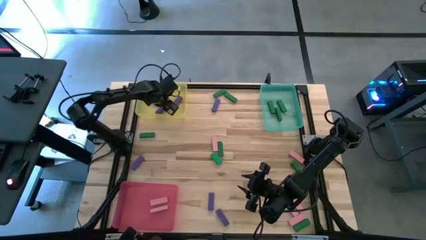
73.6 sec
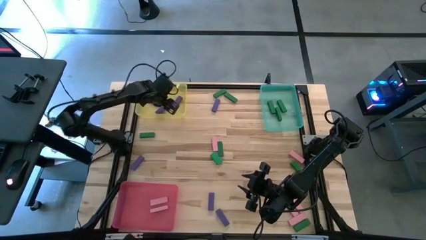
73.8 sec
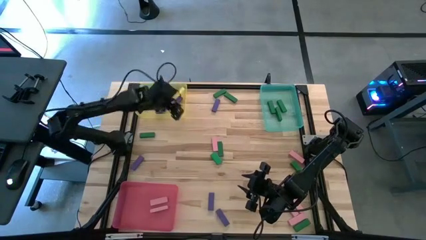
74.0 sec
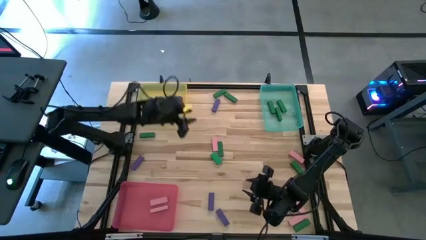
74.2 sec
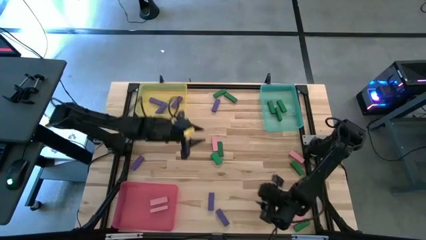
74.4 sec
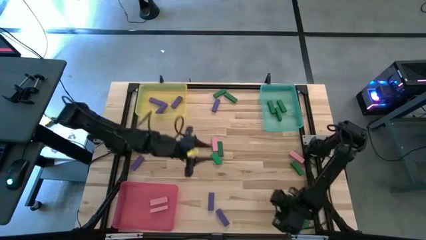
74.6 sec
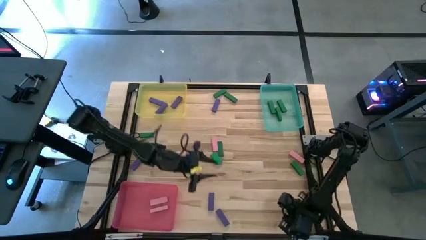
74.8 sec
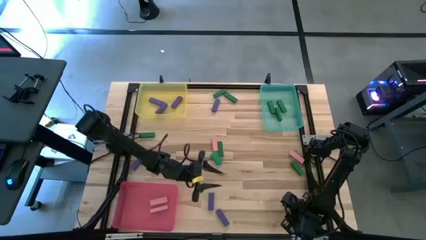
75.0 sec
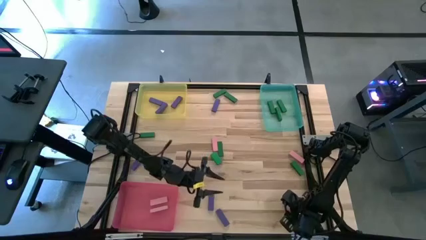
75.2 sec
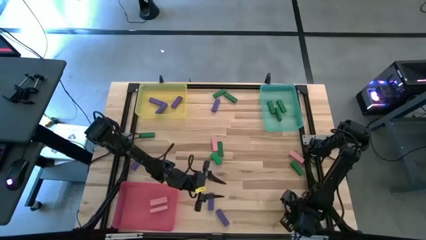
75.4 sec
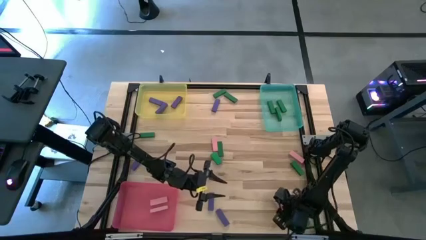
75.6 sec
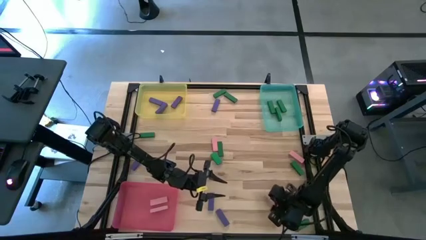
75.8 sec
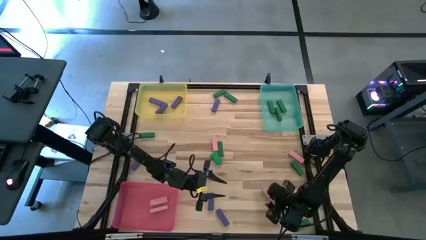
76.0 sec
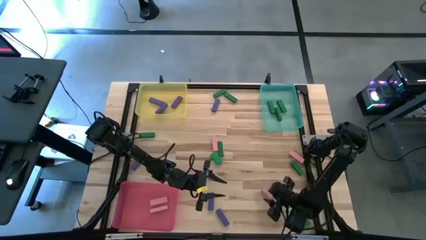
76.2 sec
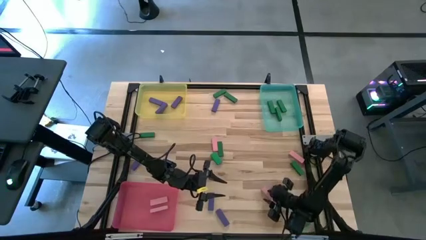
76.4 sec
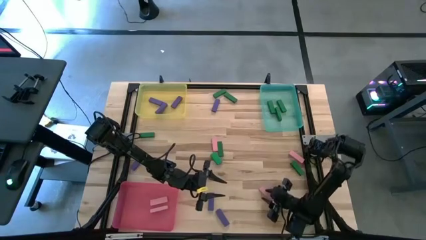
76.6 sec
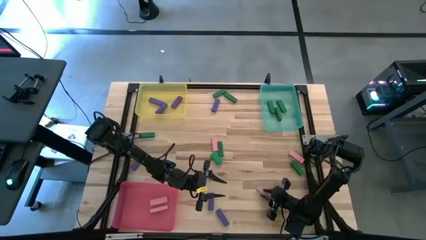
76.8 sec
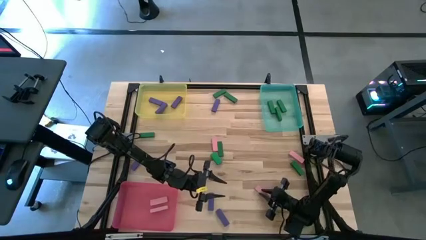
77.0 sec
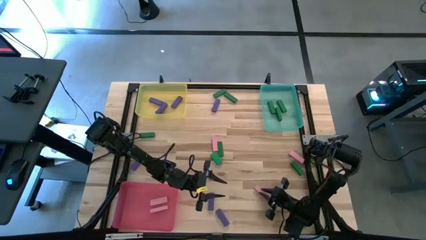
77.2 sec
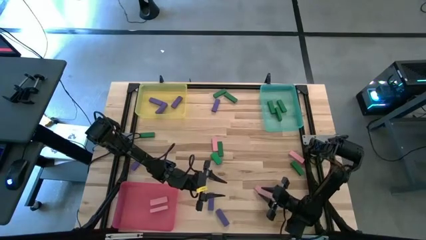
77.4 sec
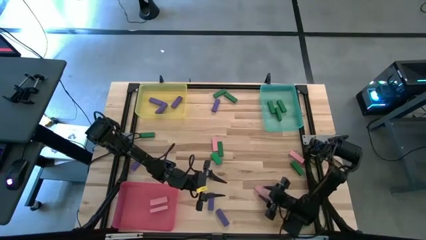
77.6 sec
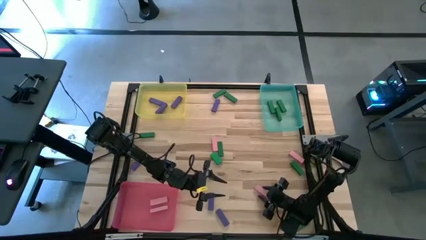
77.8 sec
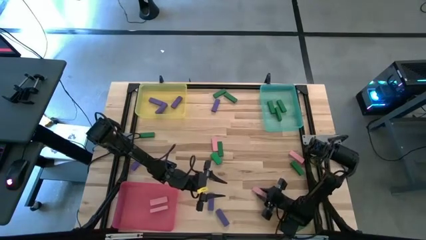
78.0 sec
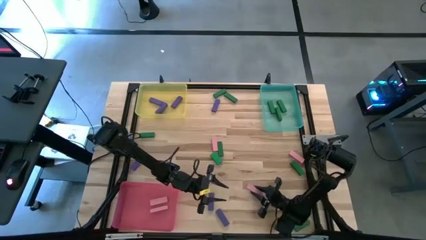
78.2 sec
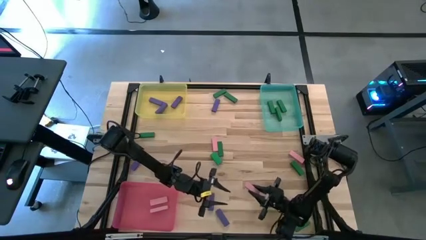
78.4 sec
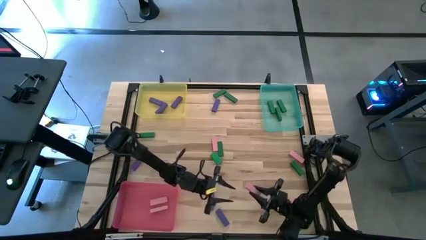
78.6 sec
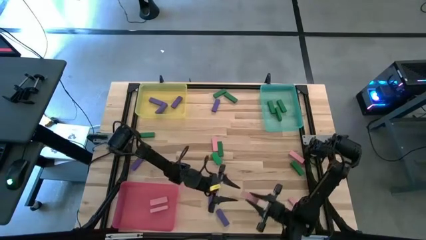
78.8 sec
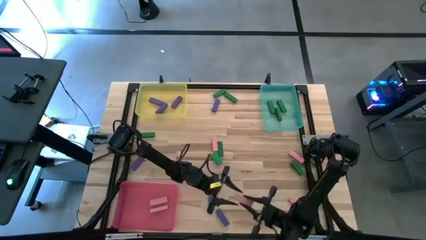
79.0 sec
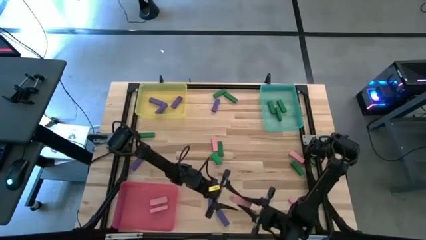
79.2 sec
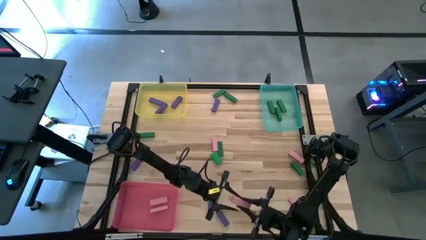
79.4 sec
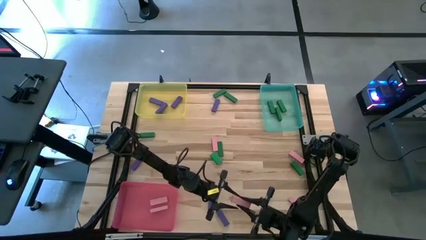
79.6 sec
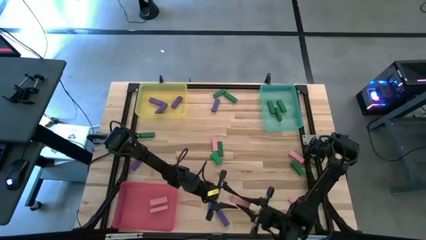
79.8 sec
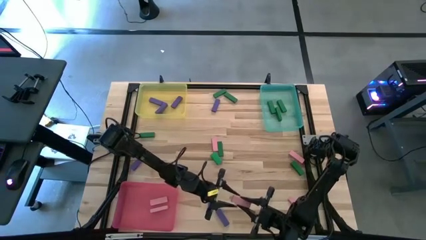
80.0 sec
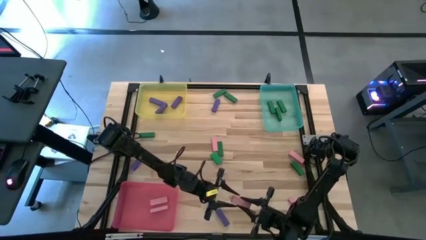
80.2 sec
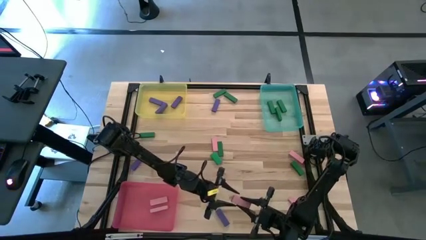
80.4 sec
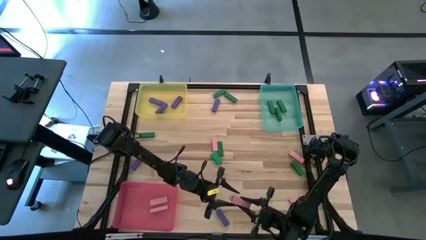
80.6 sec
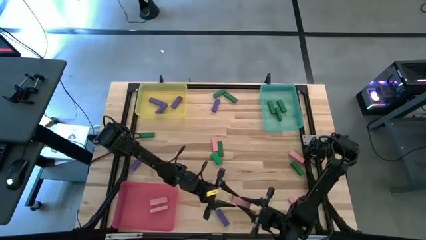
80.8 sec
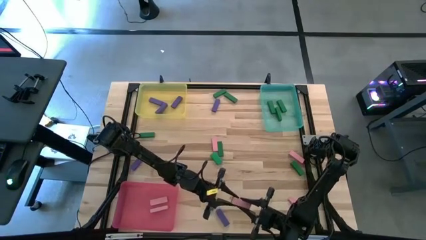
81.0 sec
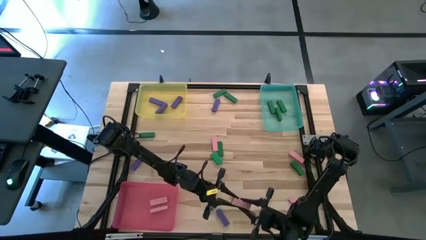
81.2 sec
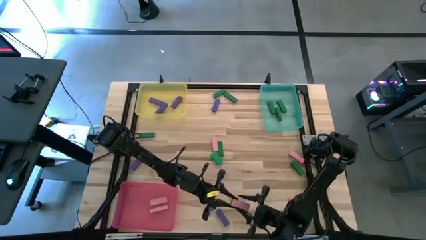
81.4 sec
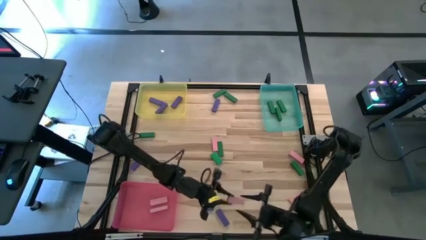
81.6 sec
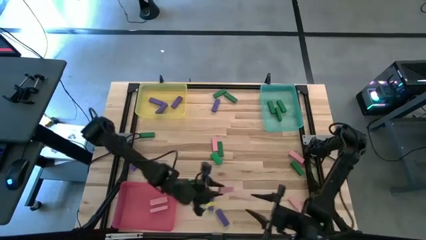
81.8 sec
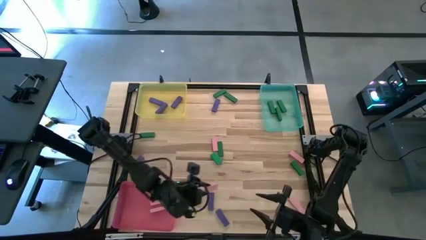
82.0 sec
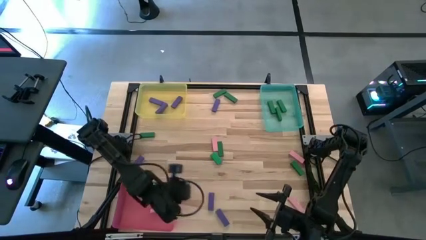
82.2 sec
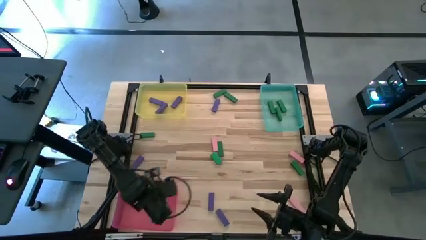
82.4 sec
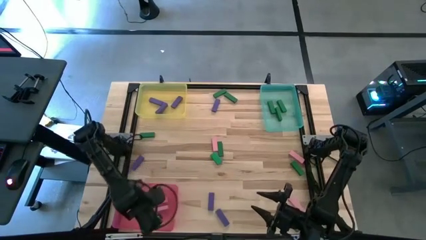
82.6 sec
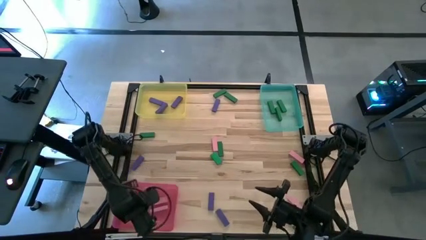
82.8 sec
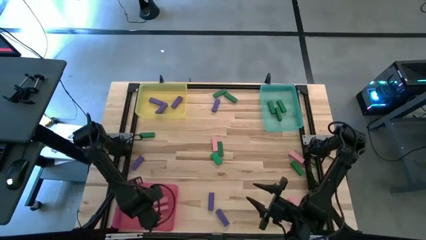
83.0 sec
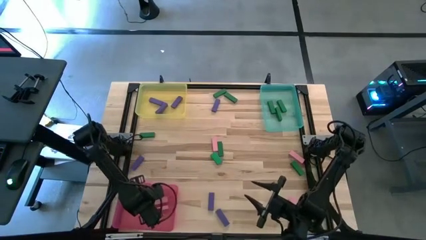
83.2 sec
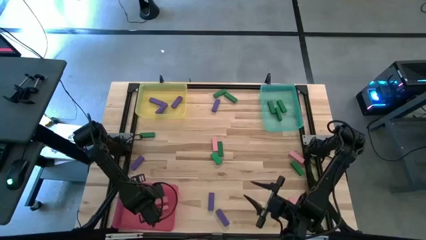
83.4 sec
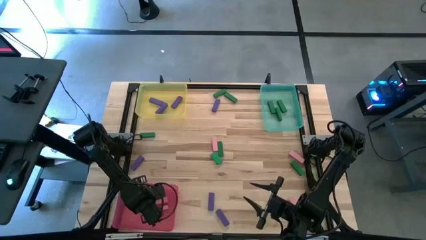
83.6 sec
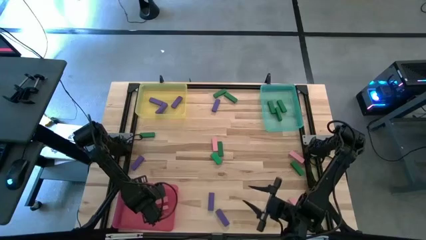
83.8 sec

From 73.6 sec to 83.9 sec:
Task: Sort blocks
Put the pink wooden block into the pink bin

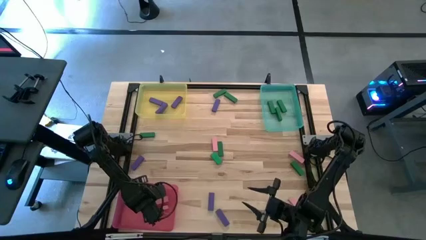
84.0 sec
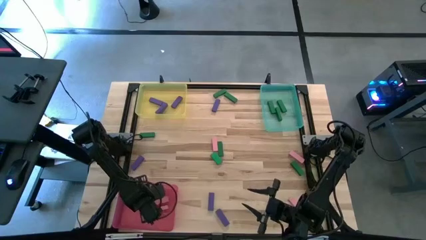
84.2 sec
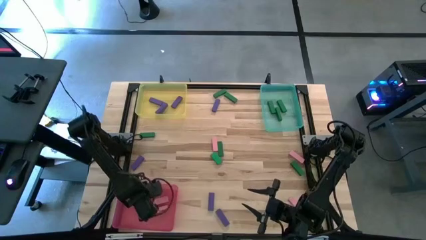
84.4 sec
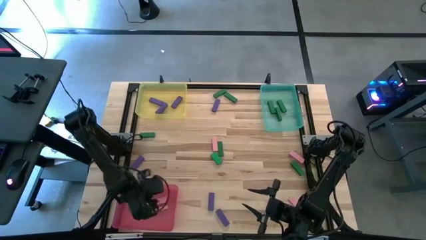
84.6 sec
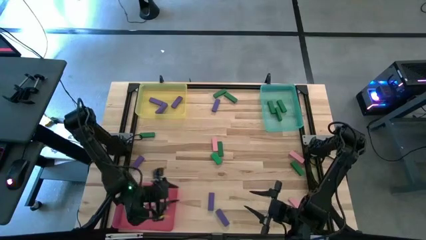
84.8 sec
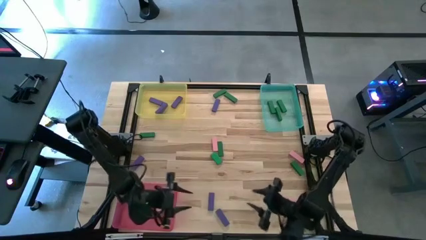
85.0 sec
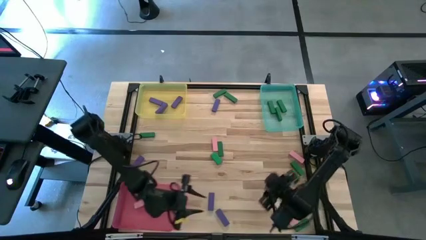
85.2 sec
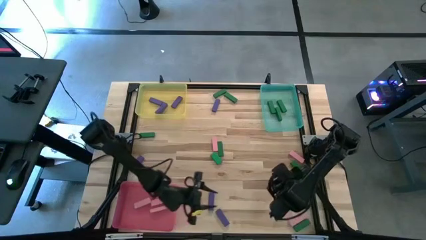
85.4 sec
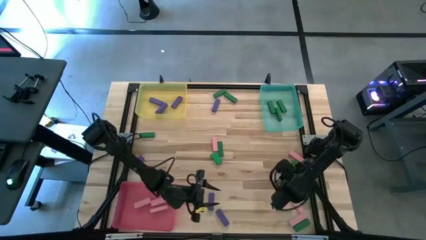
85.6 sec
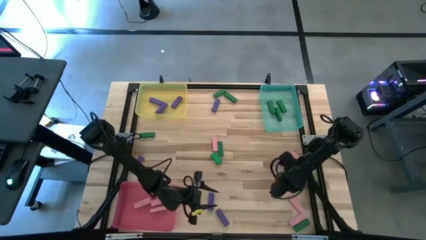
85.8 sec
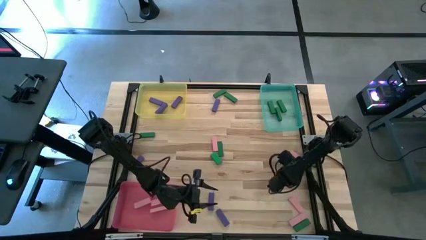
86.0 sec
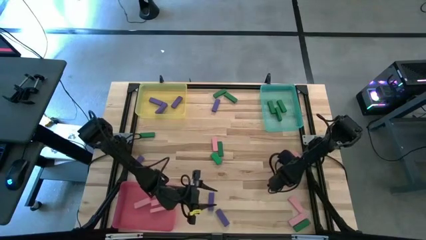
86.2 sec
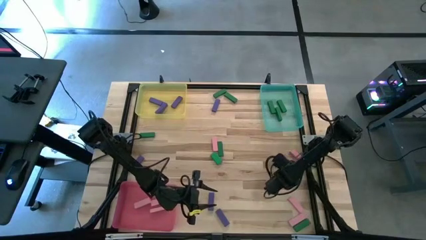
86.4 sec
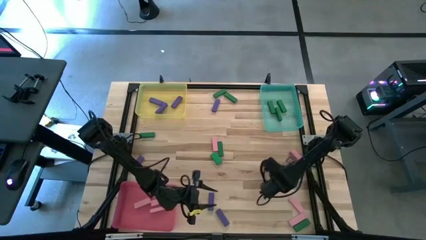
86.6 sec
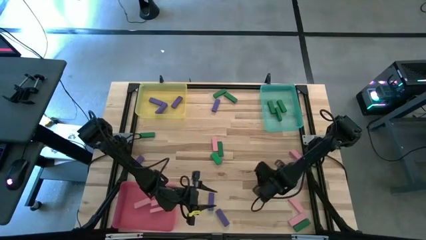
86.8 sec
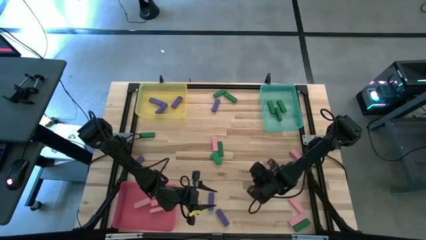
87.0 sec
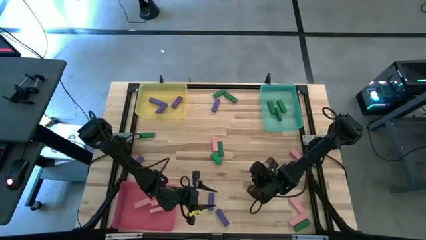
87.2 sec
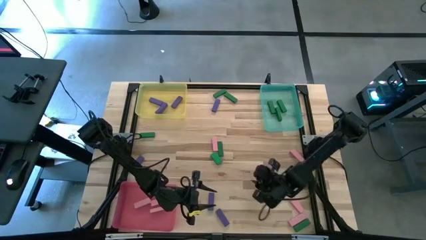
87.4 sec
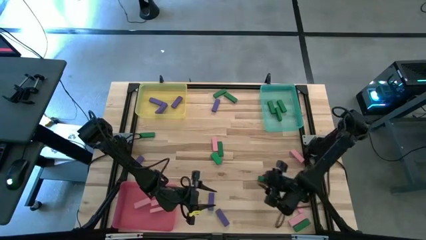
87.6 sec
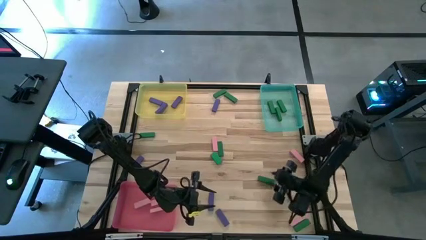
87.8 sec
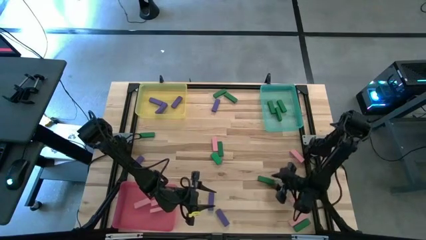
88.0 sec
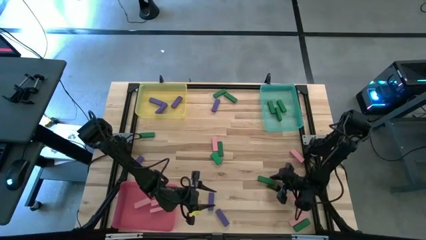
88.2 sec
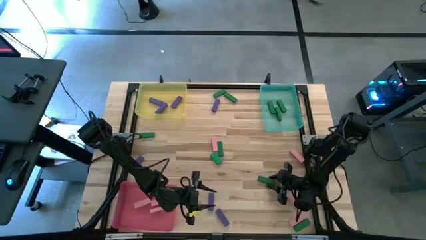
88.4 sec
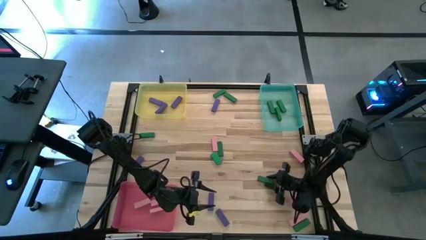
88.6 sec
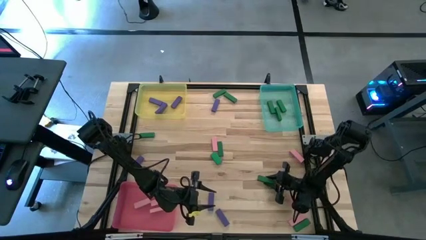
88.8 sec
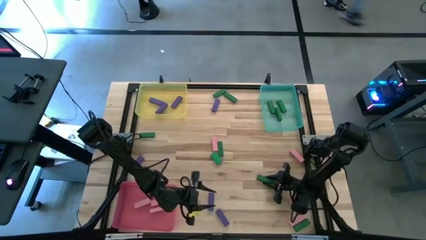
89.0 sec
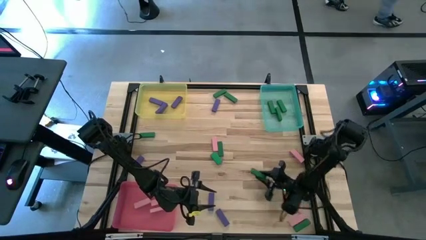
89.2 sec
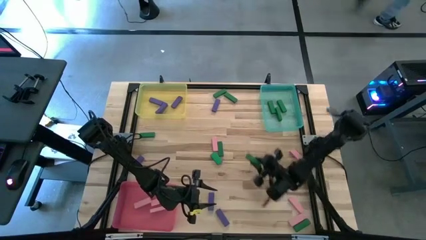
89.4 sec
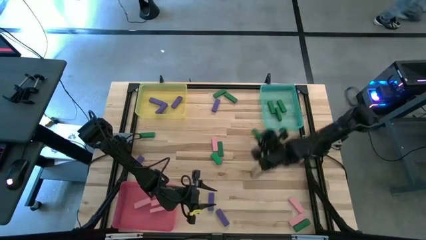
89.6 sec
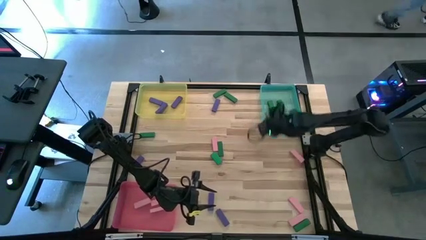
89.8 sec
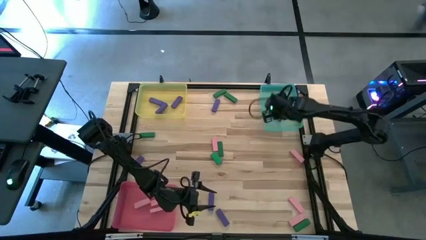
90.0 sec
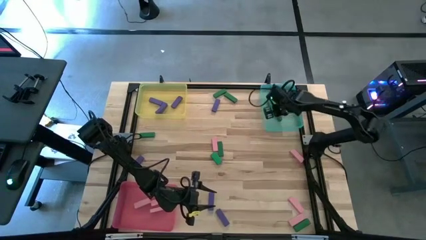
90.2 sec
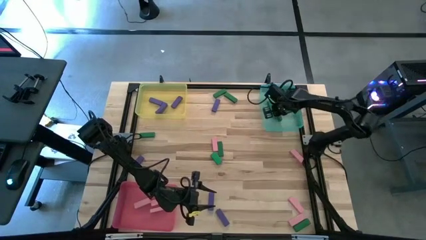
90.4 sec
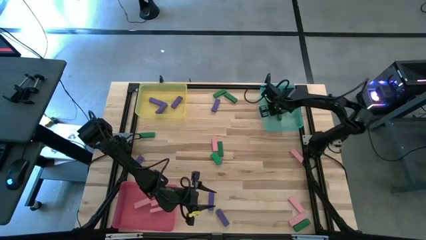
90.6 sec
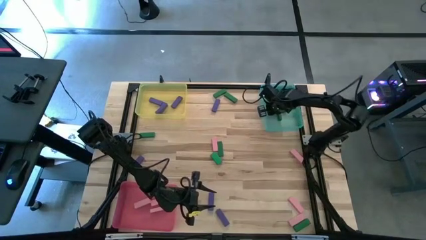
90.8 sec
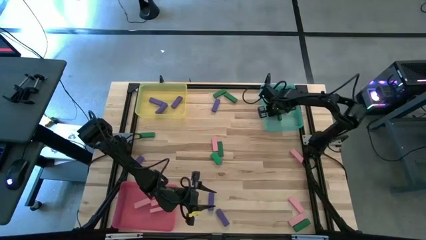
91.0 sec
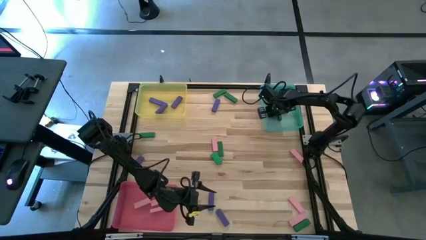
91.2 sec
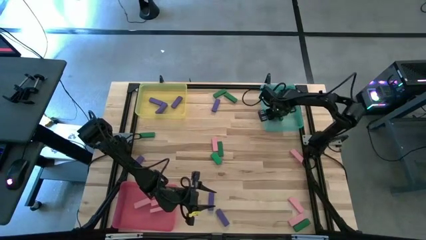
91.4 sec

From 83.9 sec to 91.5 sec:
Put the green wooden block into the green bin
